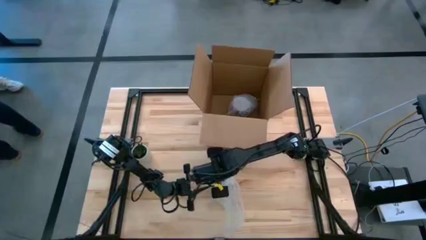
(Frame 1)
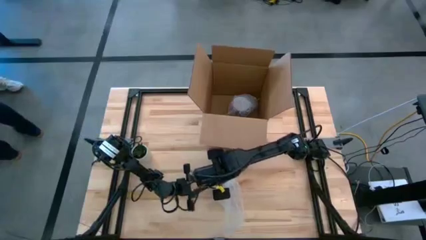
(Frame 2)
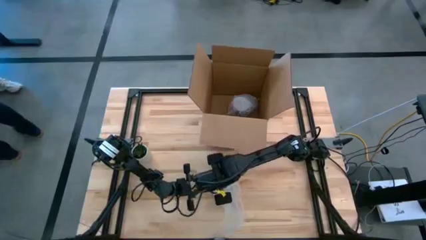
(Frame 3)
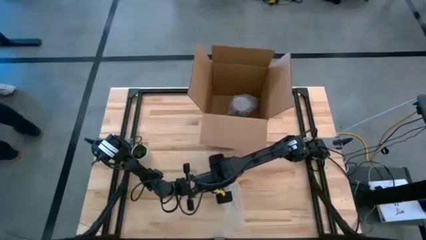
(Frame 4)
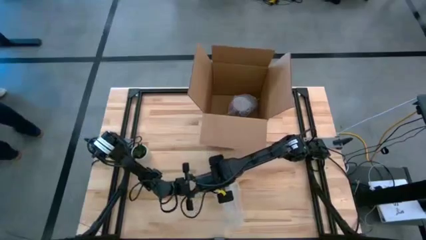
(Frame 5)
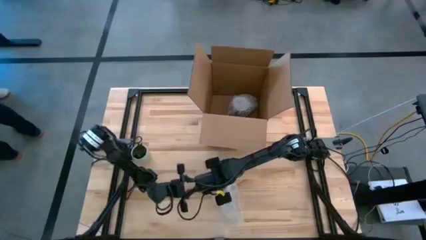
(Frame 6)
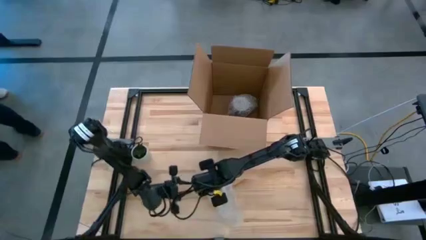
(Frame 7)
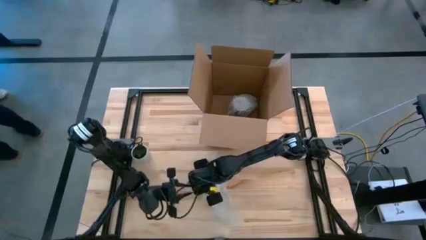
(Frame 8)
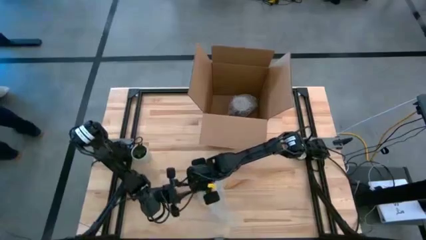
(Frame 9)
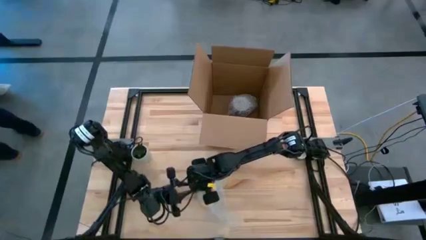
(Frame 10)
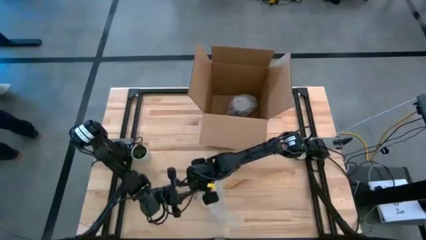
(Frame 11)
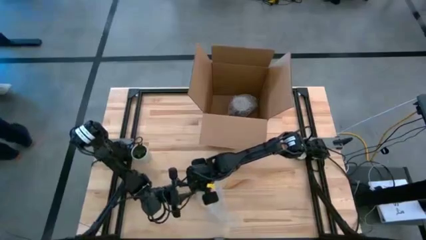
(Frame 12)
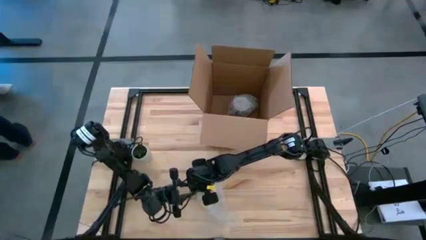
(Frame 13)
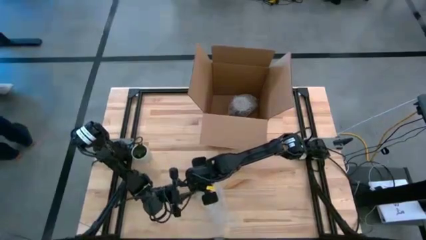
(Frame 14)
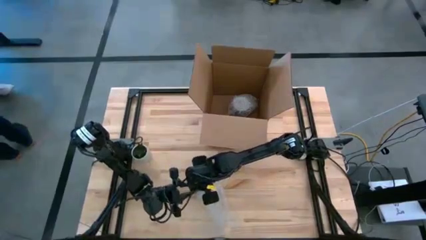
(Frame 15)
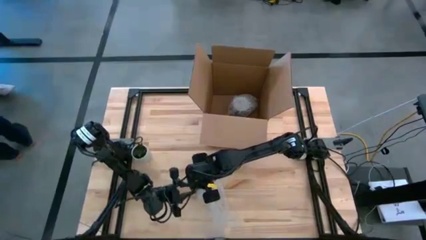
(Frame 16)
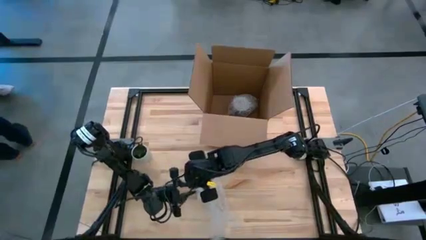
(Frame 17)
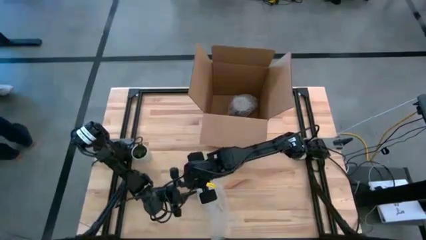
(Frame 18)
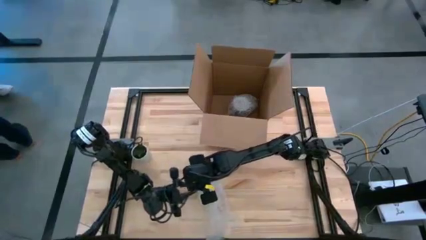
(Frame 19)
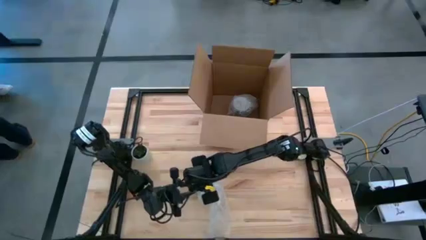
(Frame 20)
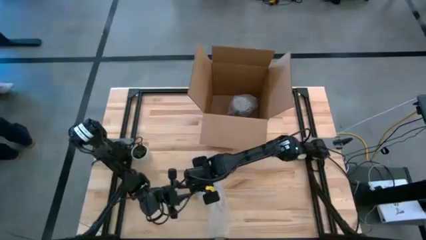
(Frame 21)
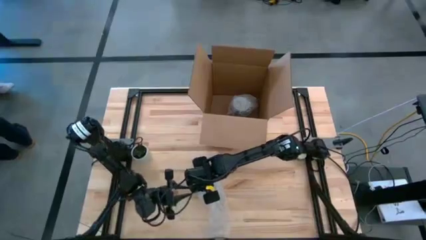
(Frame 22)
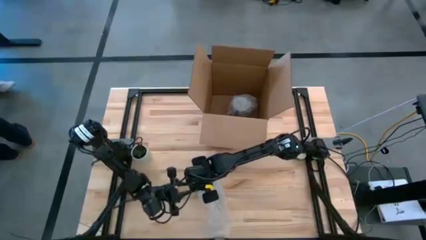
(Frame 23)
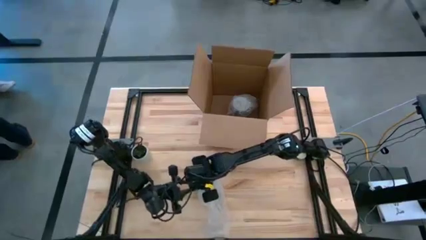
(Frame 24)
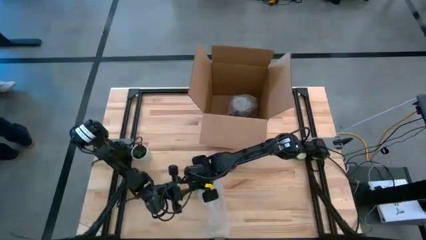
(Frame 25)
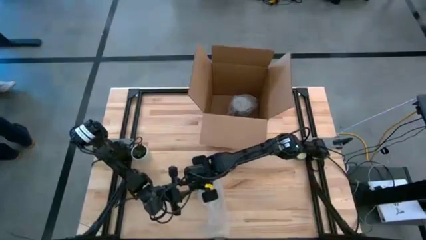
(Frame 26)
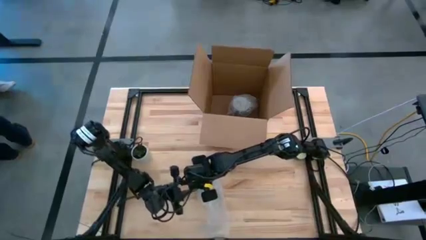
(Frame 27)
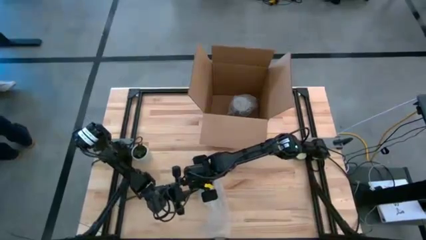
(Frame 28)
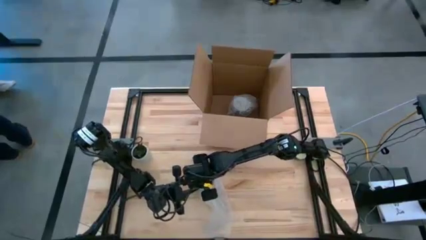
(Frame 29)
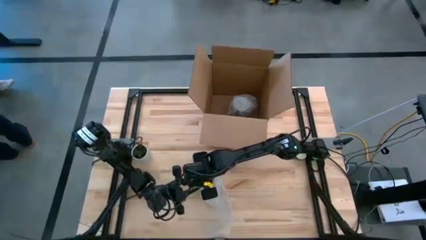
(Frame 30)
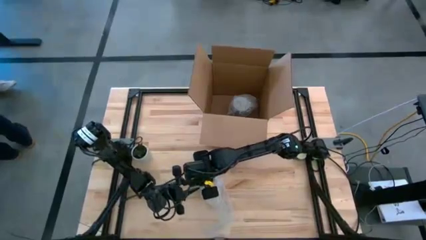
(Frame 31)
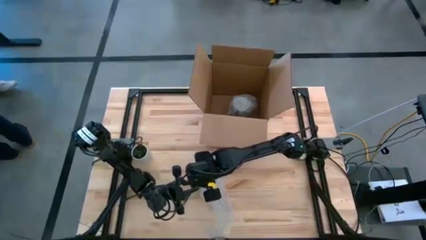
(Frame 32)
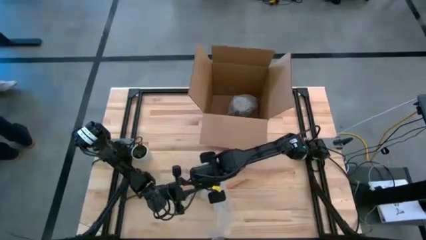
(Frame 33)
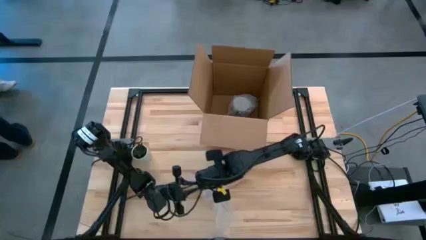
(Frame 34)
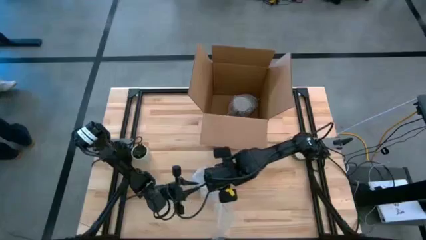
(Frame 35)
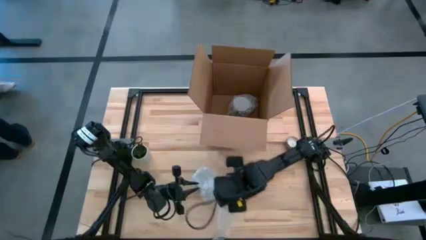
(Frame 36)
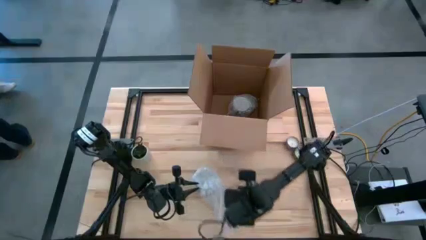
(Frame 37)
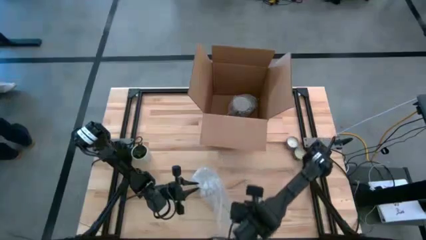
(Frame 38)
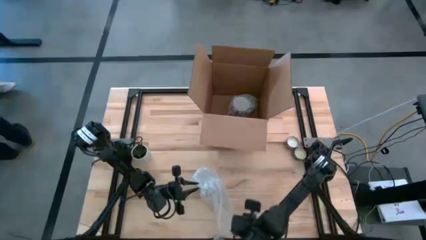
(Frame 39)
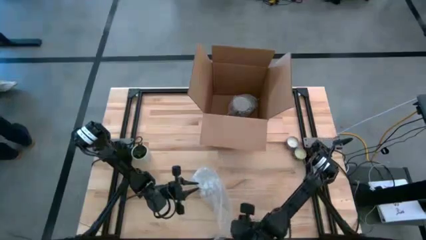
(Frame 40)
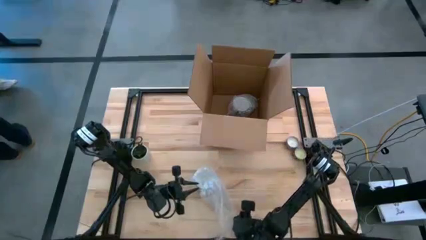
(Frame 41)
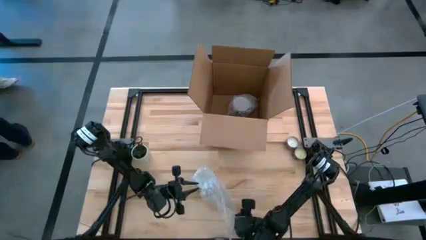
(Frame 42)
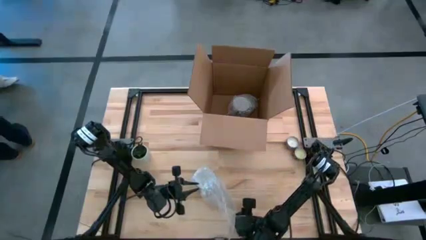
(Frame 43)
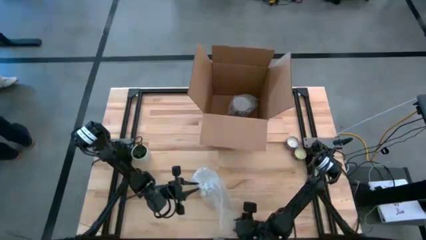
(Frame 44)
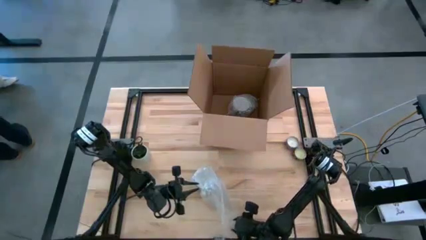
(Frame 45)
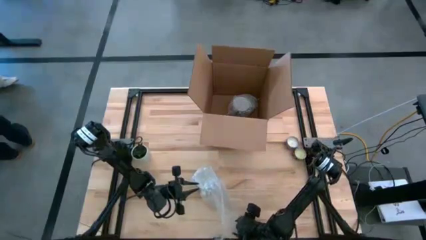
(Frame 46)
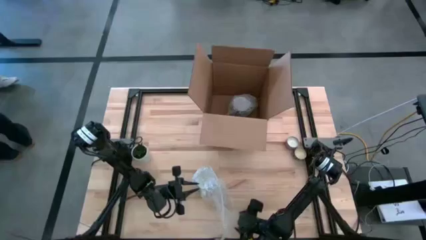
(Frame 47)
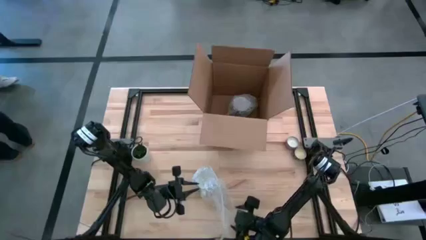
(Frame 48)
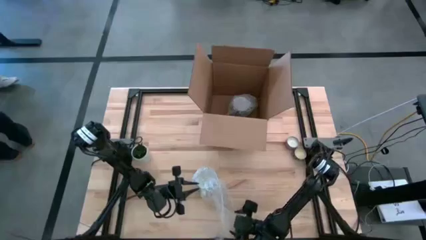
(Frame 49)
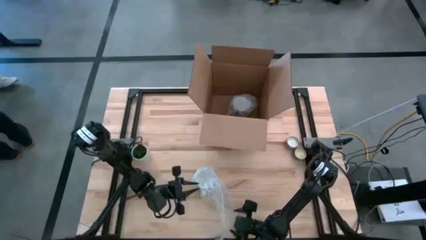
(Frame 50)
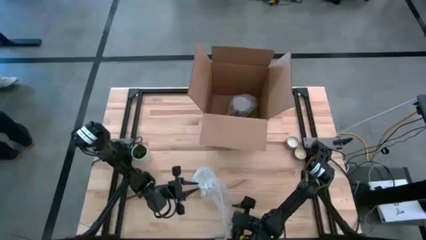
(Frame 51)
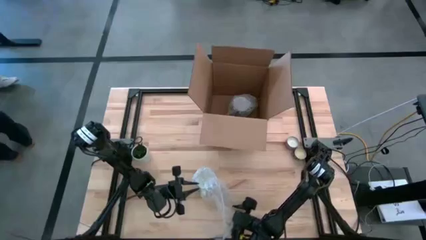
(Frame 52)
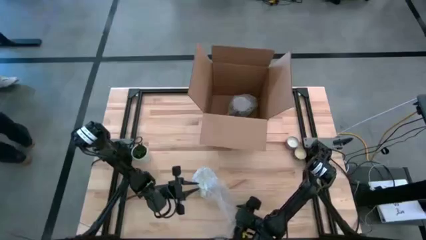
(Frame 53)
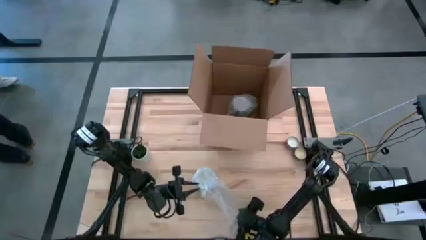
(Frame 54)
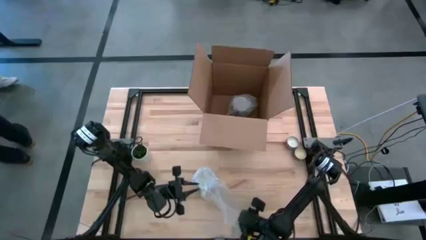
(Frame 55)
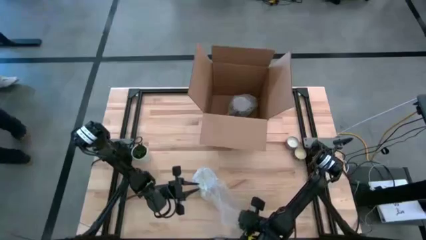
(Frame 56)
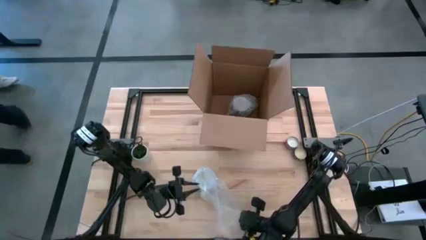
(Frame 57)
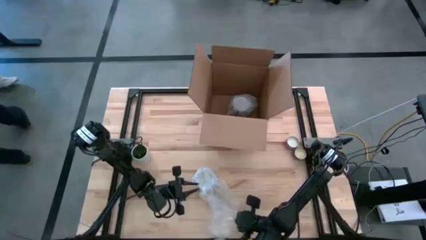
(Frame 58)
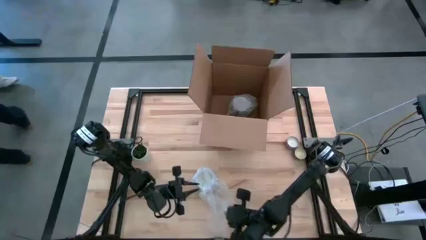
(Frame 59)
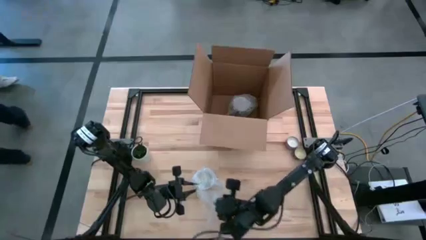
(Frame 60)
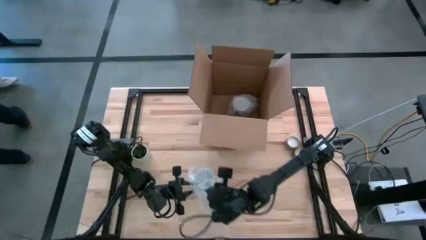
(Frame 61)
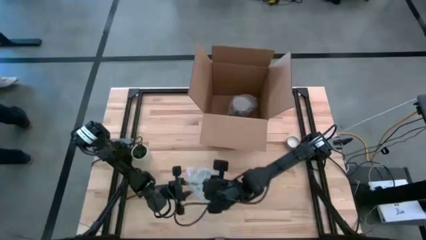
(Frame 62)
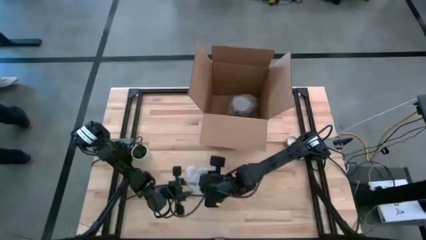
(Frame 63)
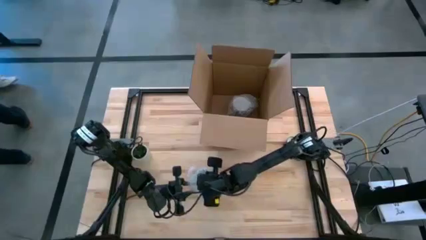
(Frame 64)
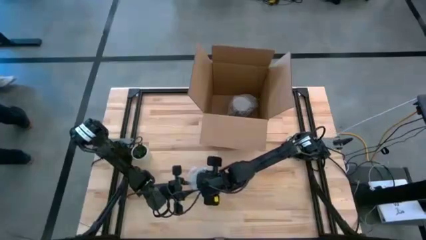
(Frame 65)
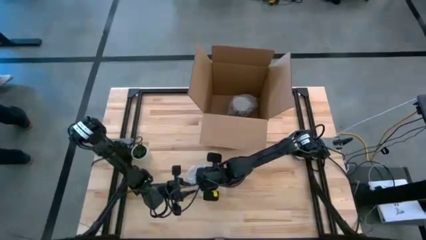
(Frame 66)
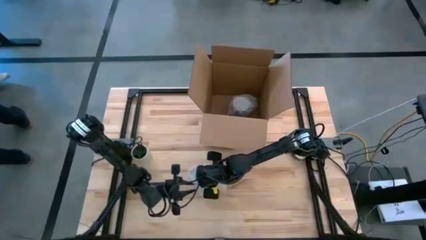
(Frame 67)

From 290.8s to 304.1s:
Task: wrap mug
Wrap the blue patterned mug with the bubble wrap

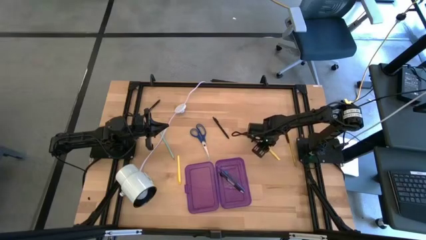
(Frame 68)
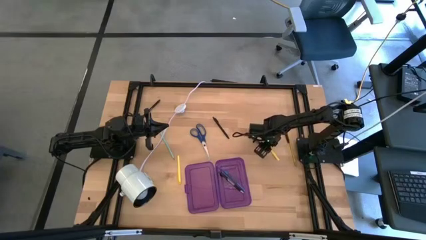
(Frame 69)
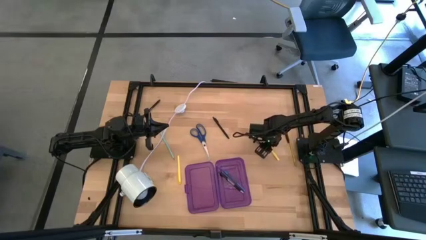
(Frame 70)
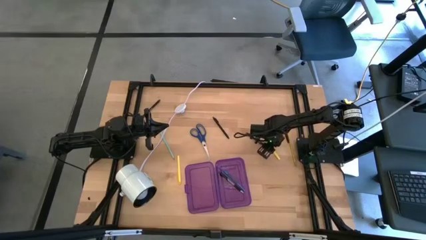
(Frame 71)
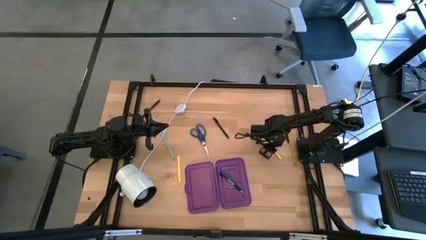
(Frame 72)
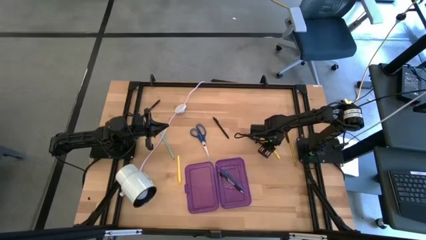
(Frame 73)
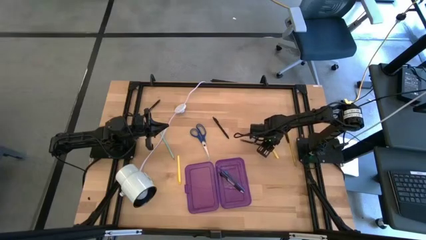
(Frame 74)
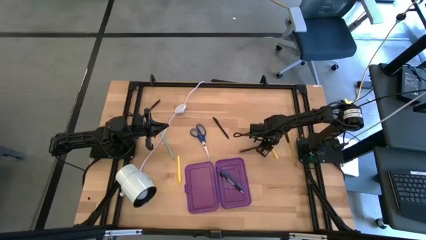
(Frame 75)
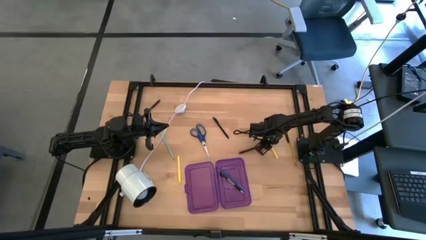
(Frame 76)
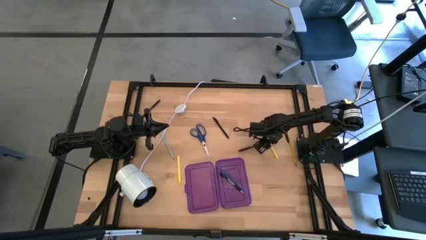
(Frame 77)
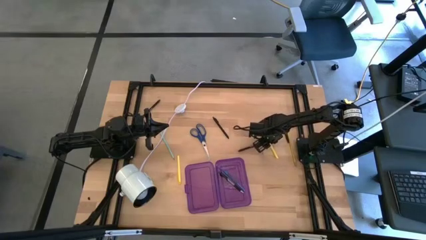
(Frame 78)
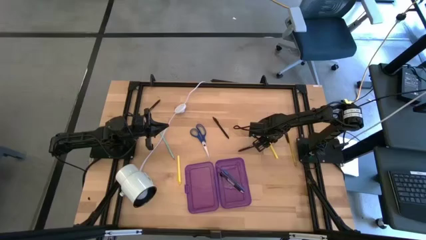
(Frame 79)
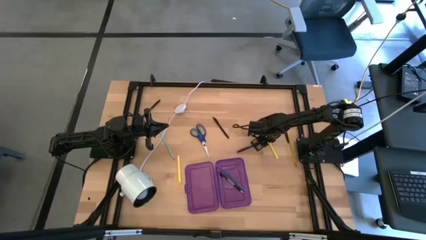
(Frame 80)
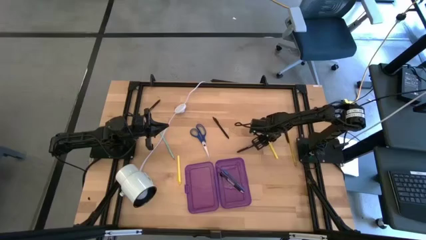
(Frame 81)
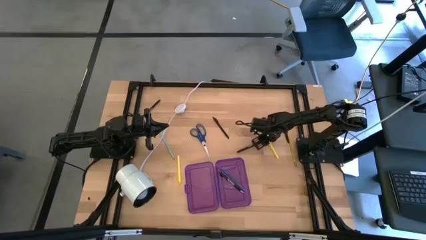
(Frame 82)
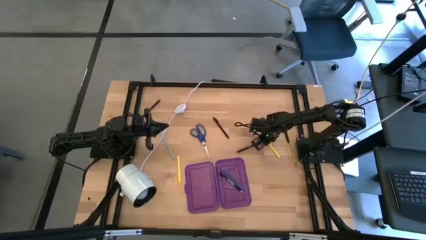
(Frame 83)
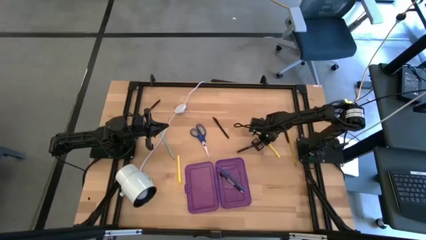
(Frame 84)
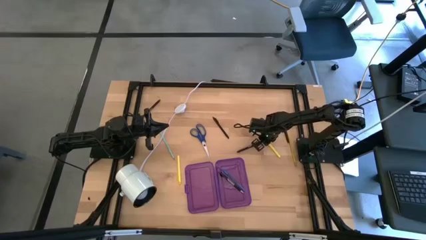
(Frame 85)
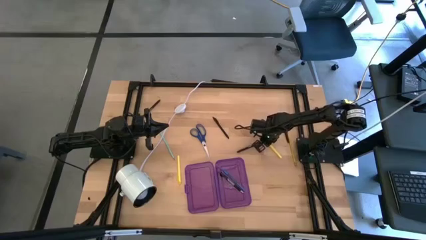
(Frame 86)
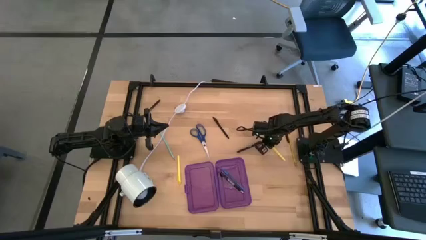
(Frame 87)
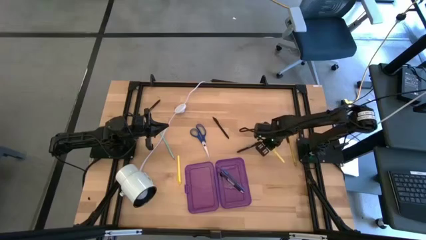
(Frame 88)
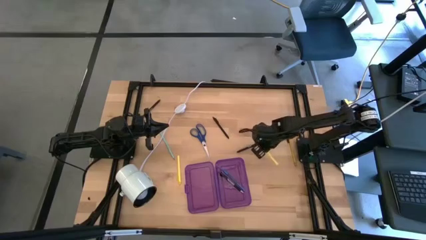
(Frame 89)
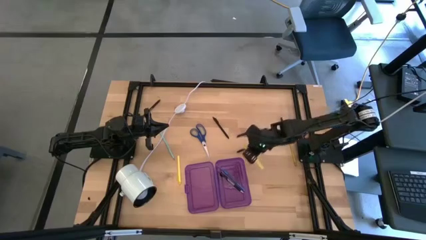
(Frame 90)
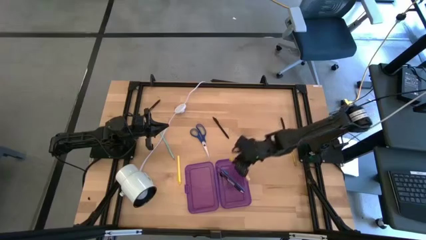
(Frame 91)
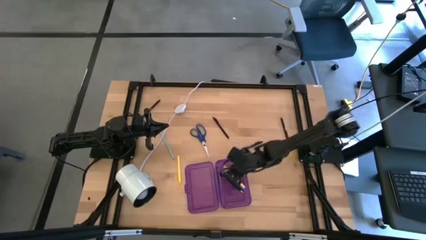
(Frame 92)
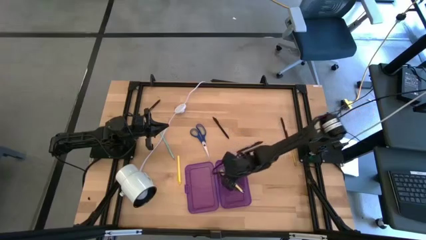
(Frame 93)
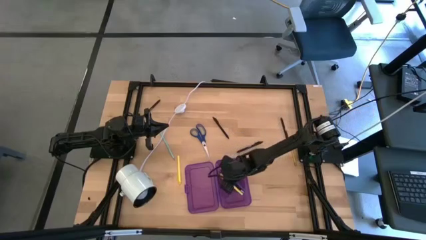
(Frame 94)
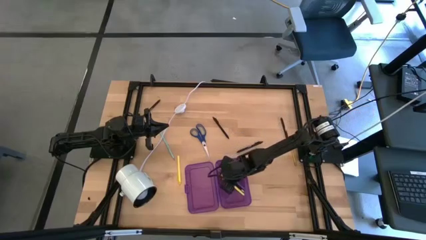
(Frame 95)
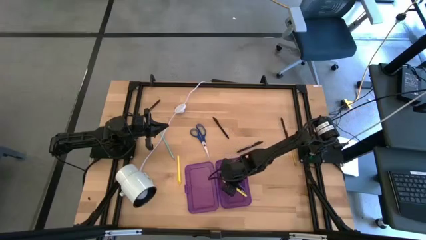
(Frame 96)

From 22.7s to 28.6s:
Task: Pick & place school supplies into a supply box
Put the yellow pen into the purple supply box
